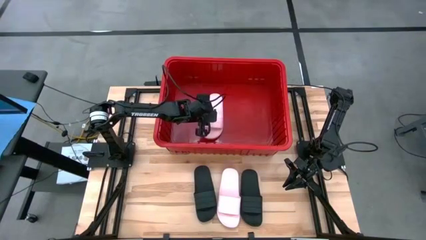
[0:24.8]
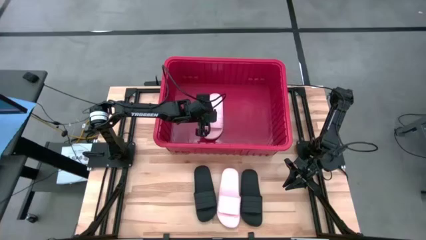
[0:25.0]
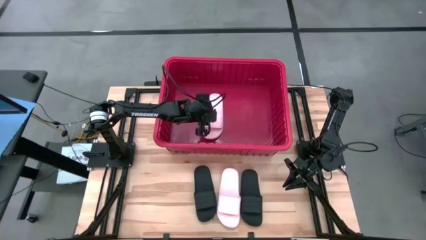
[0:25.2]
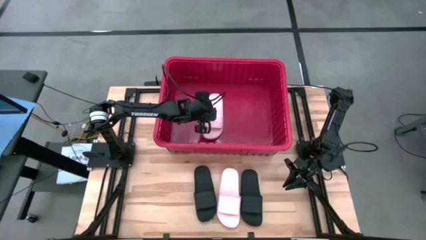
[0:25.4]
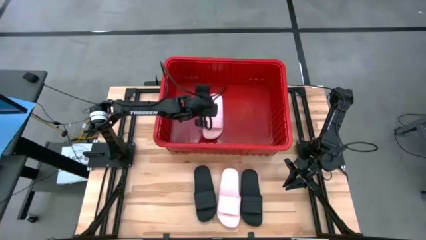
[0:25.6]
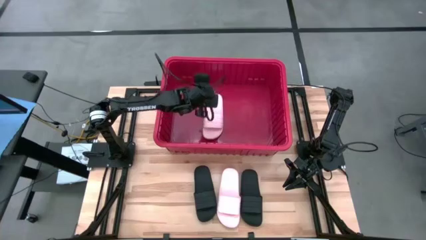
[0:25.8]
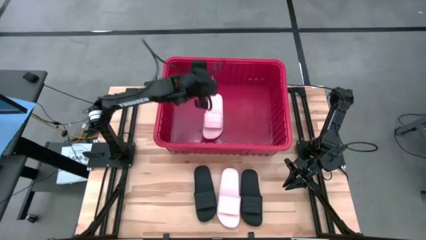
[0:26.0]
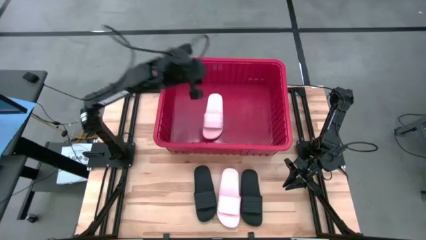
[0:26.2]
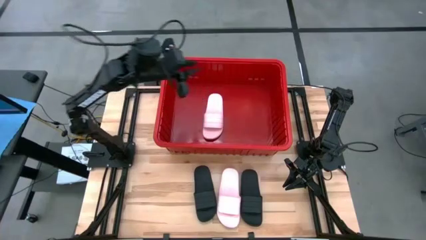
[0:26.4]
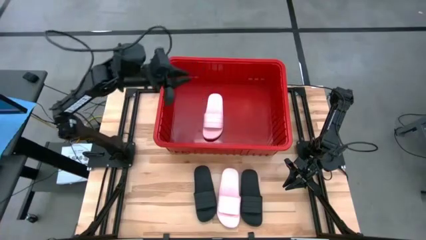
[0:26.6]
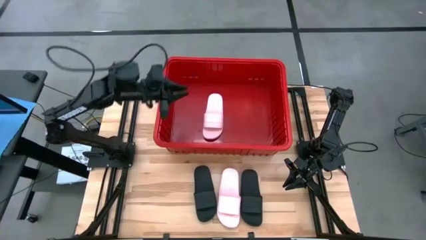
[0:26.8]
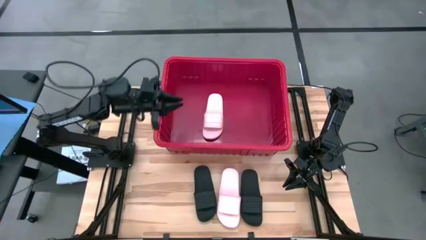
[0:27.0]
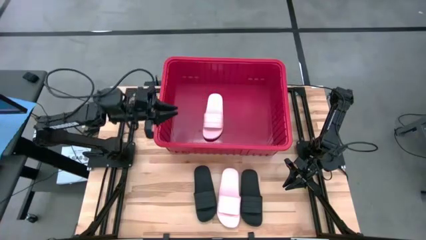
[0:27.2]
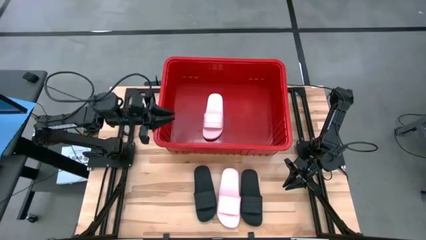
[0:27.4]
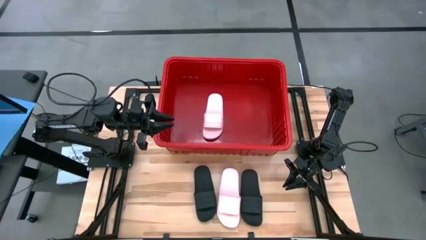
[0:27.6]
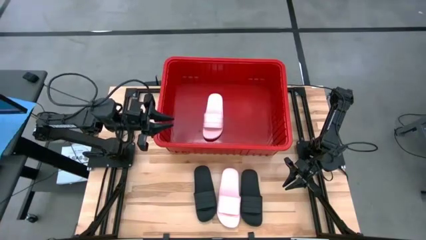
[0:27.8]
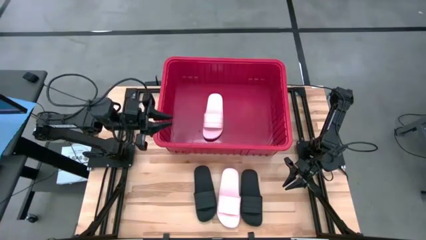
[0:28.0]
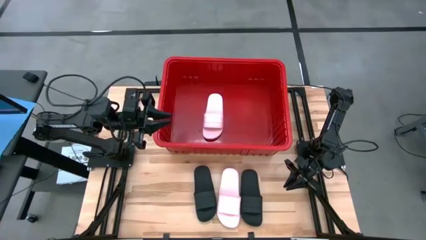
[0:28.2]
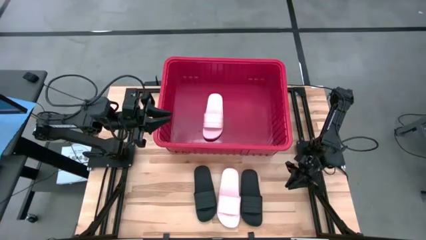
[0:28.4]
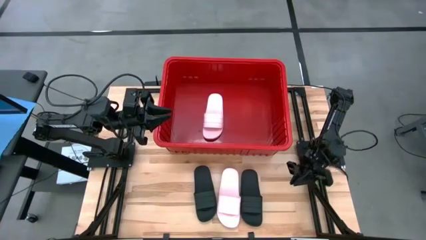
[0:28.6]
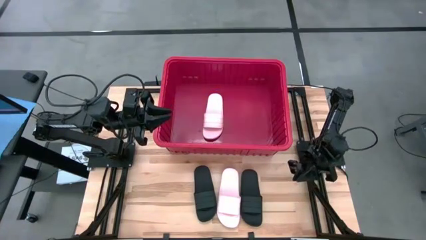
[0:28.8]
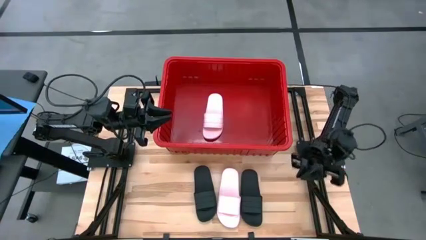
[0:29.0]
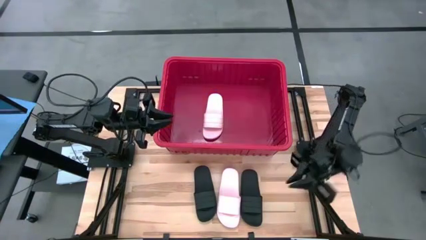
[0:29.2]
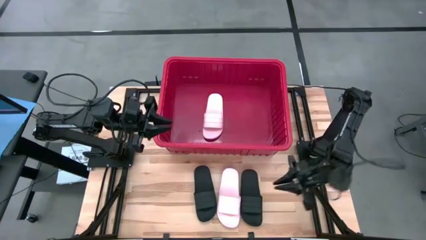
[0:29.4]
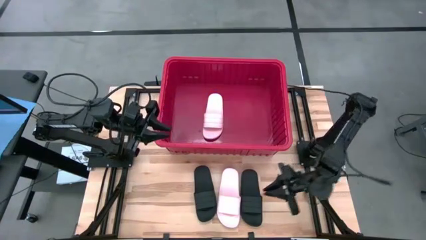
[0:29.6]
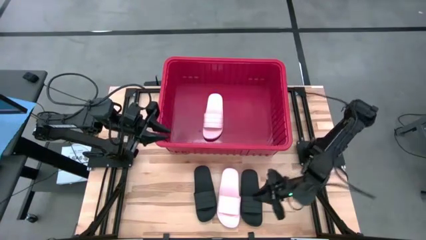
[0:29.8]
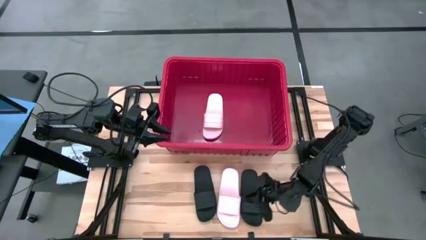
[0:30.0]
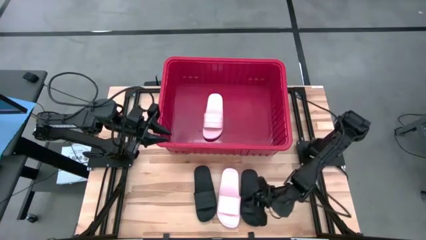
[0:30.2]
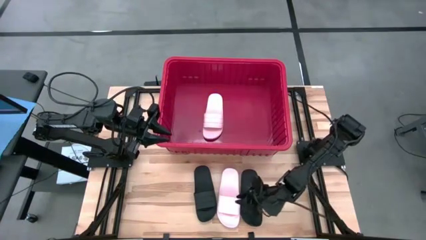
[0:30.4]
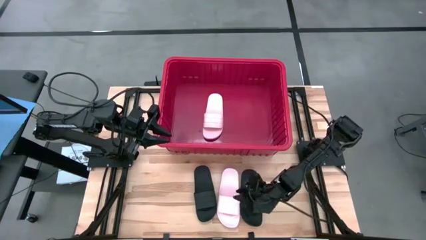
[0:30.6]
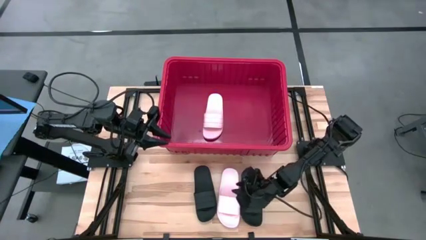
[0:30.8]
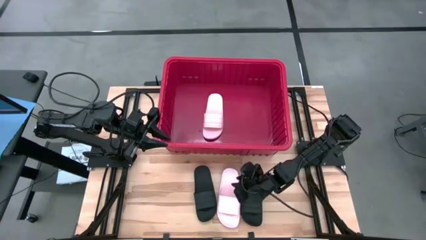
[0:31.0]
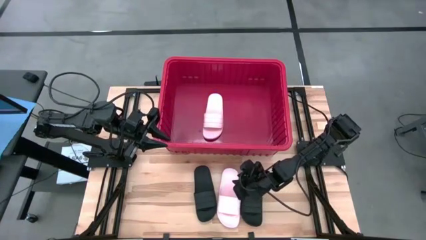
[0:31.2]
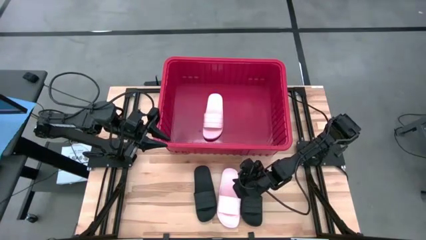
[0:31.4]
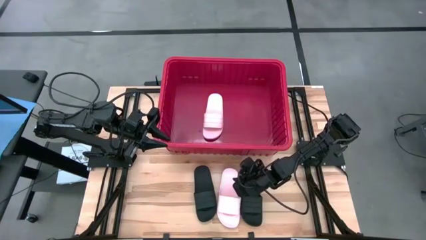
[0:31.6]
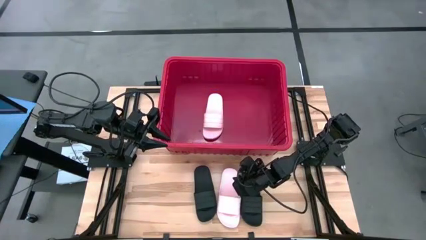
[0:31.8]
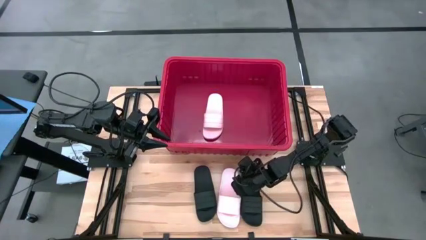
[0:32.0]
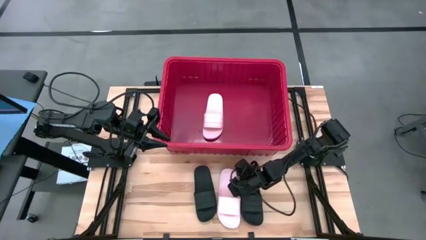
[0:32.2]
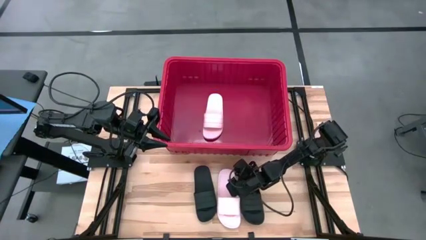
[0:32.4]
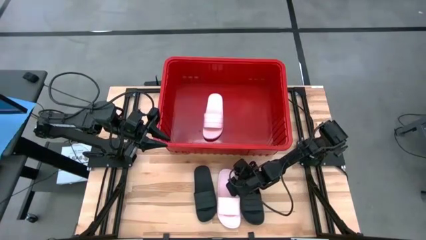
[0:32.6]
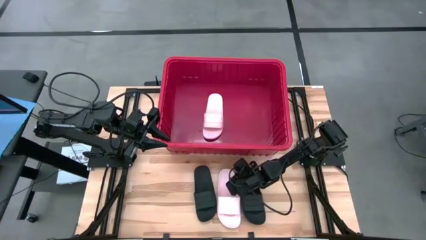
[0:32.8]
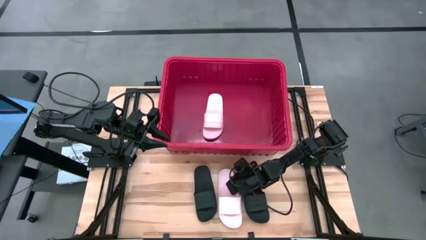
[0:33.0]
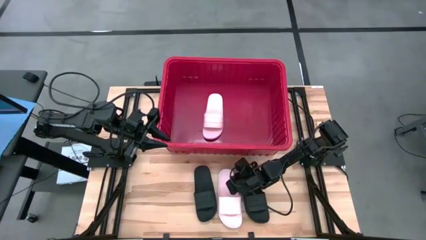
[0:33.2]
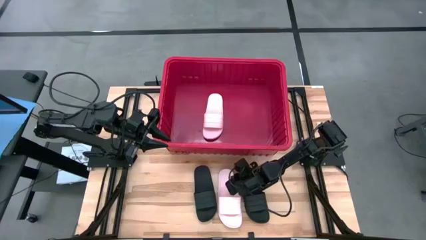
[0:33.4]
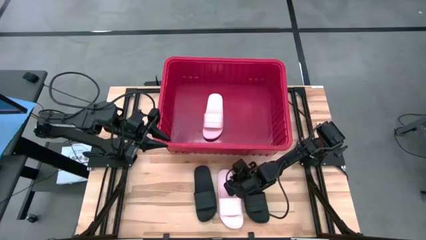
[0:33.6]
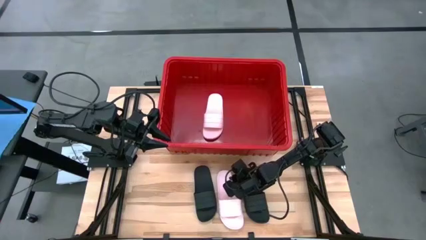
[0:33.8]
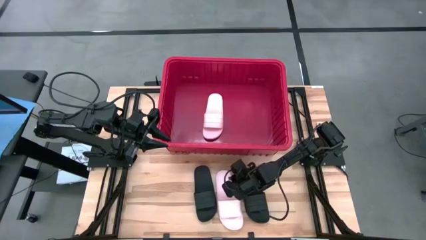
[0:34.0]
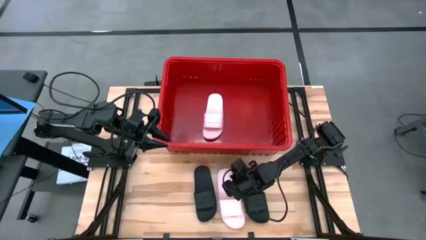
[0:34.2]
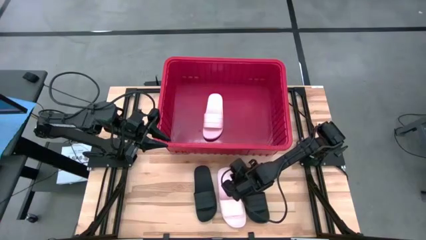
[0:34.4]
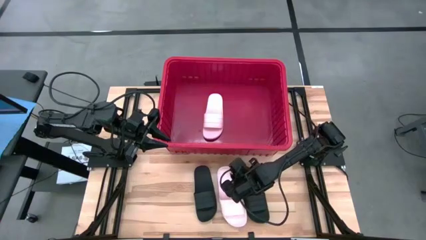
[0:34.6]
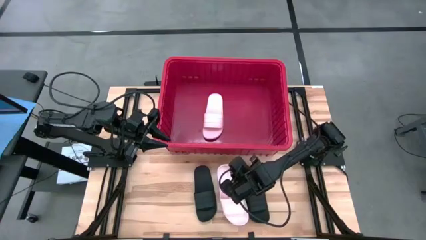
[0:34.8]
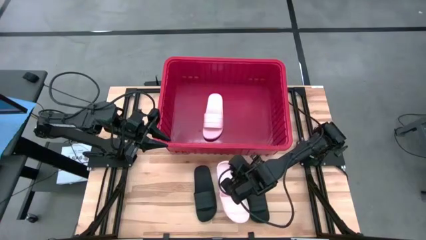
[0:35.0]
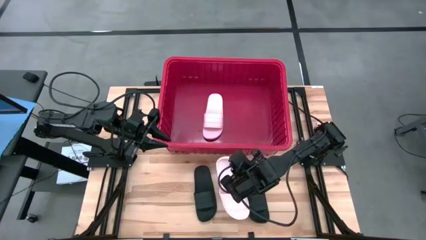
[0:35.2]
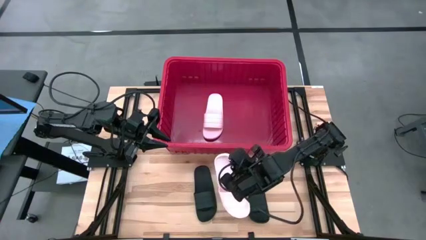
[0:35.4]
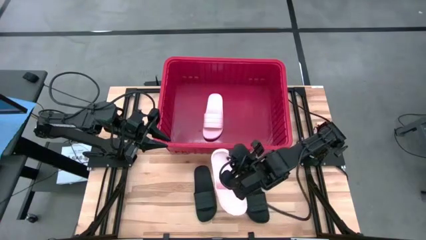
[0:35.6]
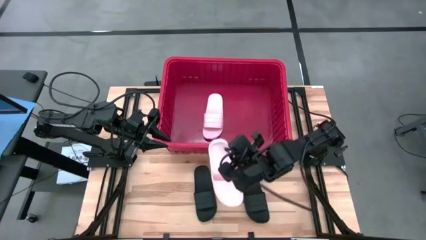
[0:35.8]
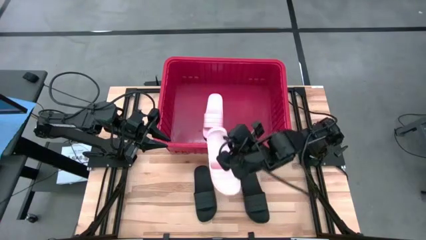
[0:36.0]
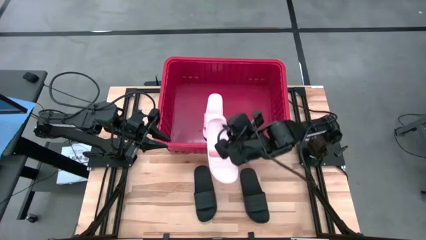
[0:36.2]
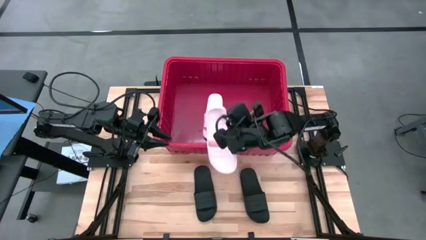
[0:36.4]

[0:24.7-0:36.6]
Task: Pick and place slides into bin
Put the pink slide into the red container
